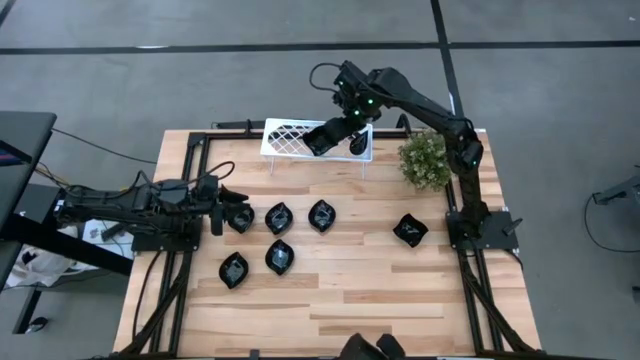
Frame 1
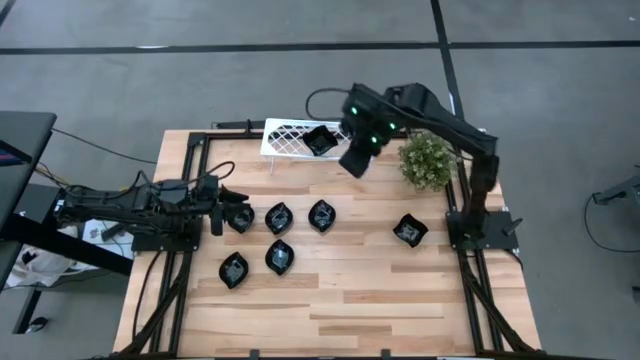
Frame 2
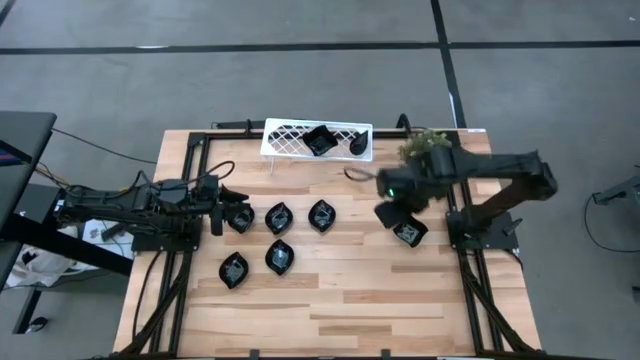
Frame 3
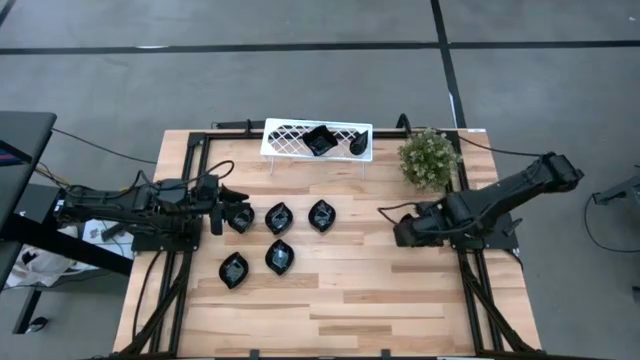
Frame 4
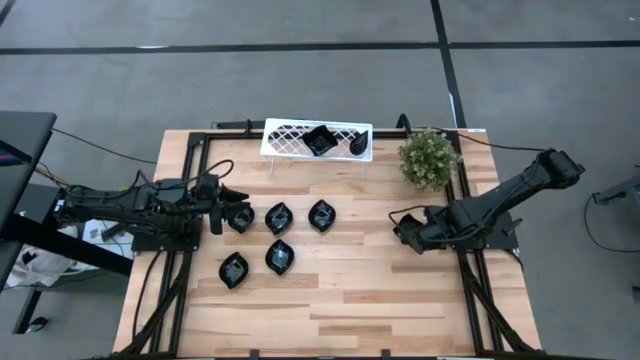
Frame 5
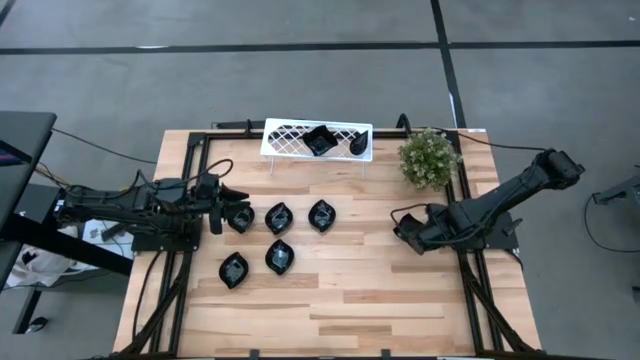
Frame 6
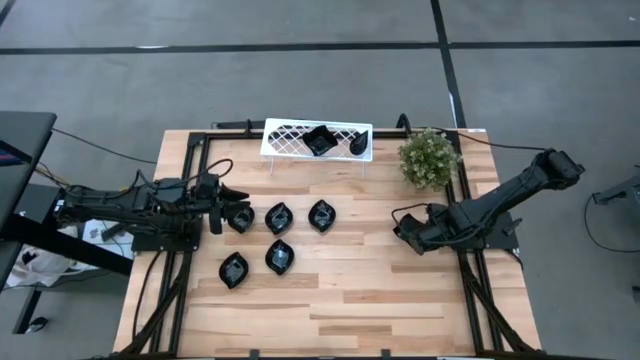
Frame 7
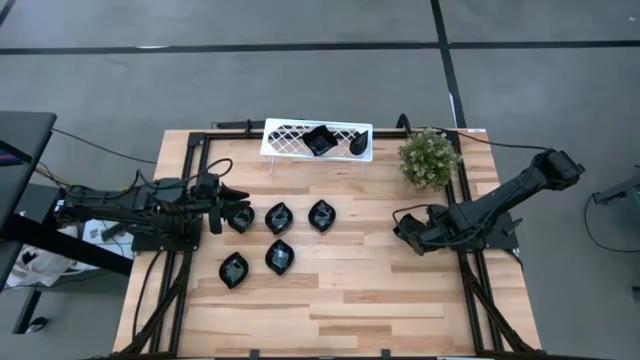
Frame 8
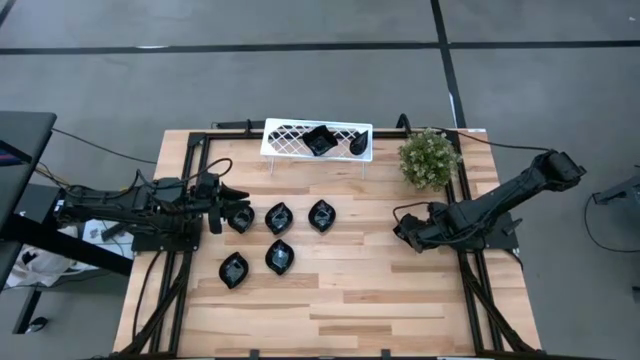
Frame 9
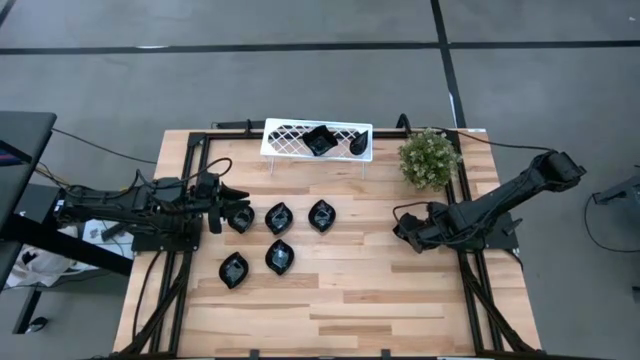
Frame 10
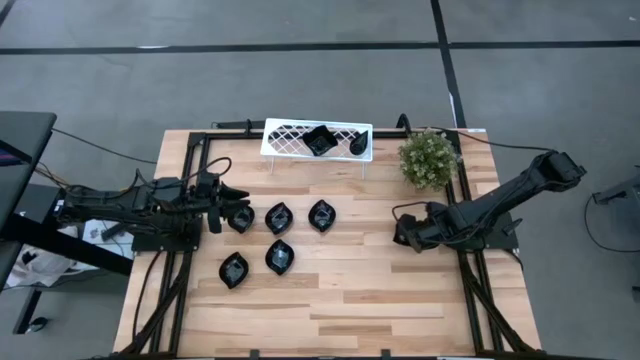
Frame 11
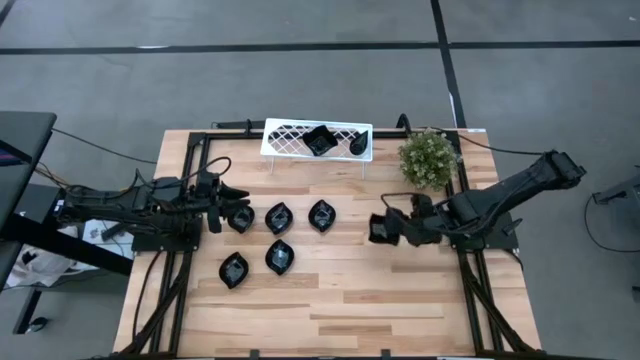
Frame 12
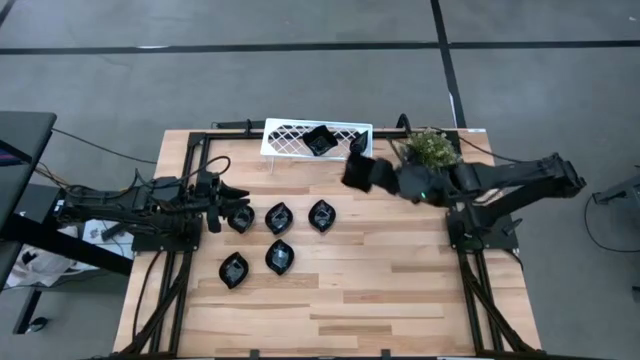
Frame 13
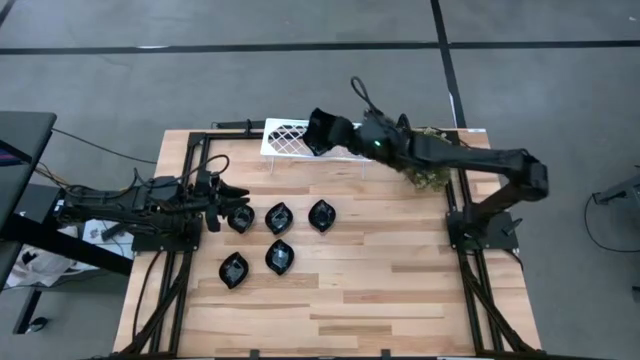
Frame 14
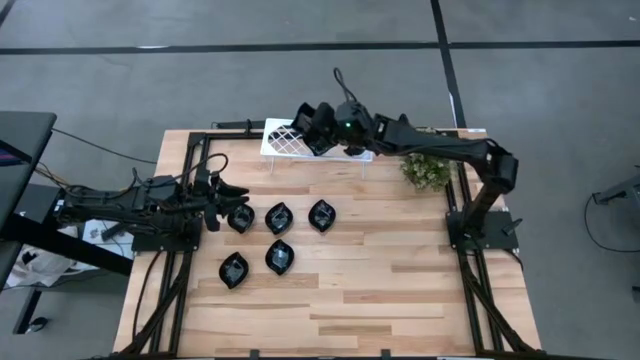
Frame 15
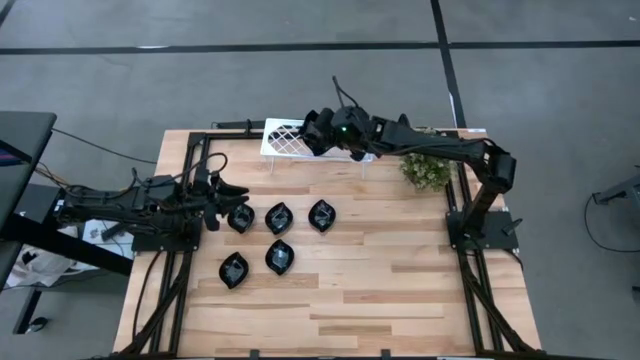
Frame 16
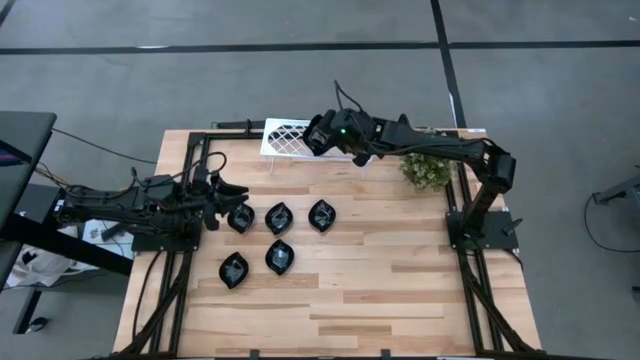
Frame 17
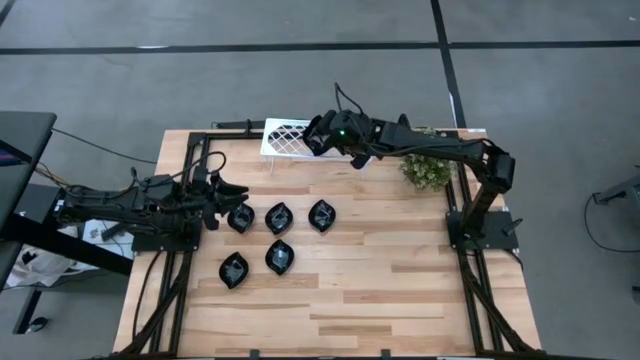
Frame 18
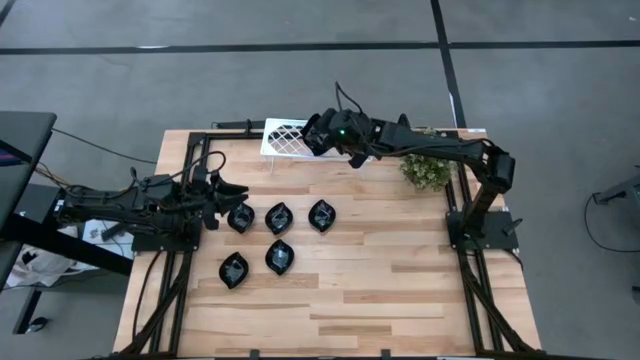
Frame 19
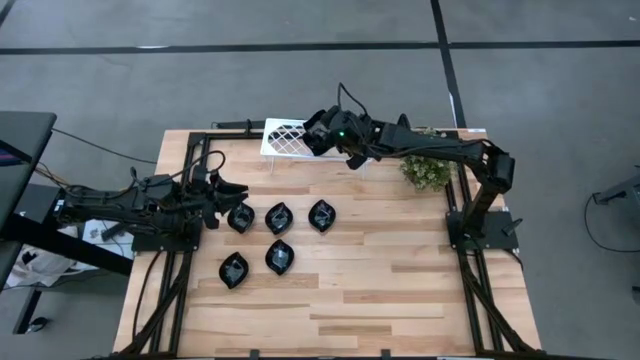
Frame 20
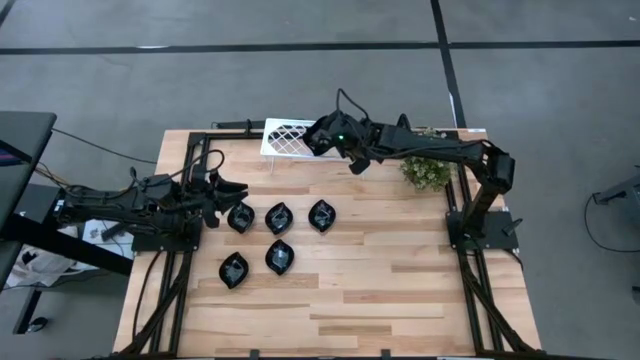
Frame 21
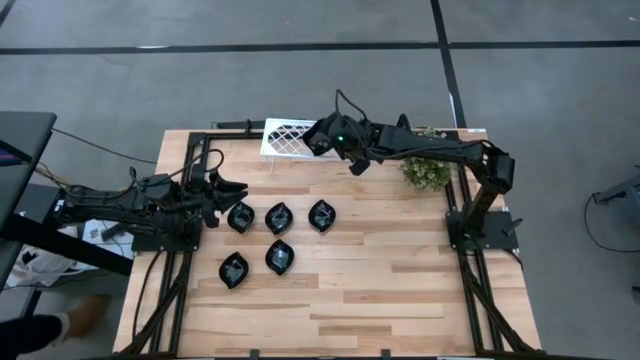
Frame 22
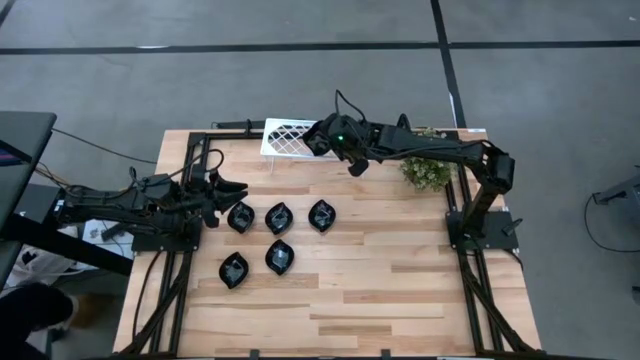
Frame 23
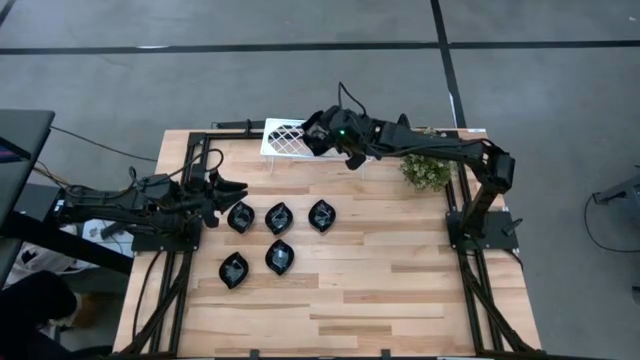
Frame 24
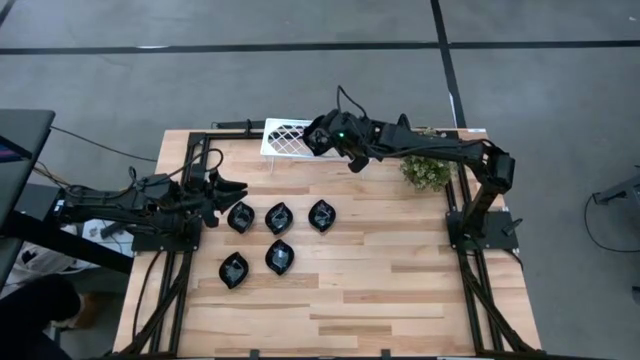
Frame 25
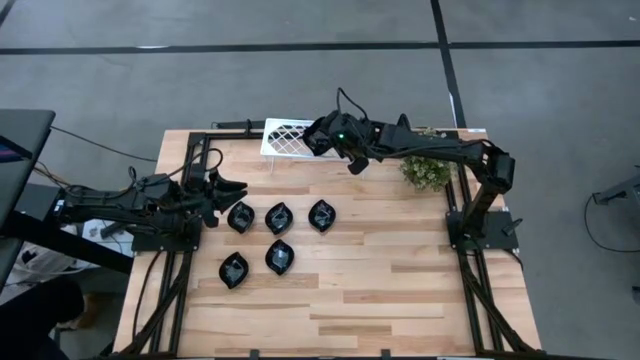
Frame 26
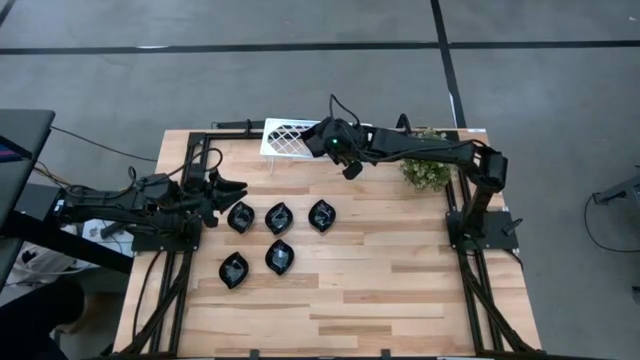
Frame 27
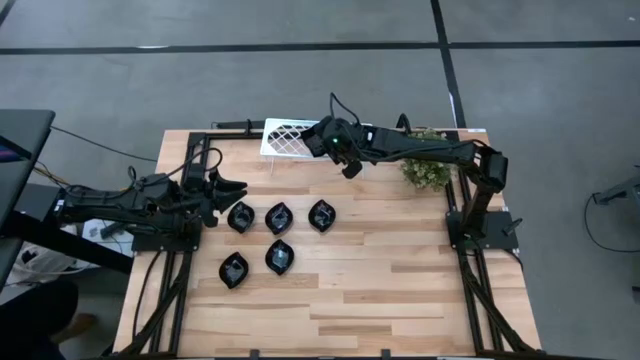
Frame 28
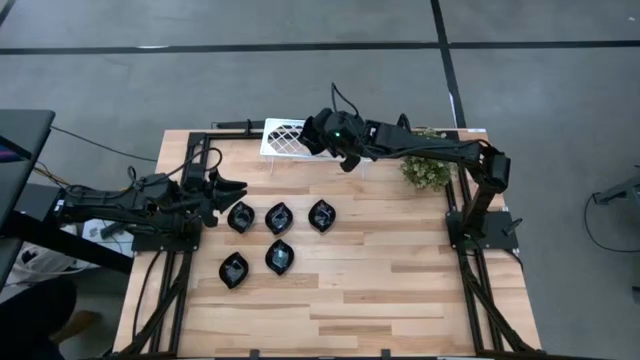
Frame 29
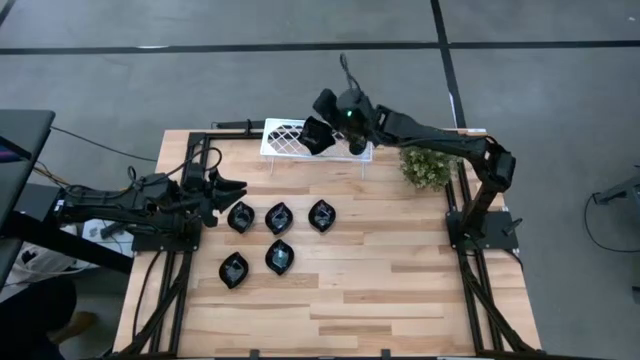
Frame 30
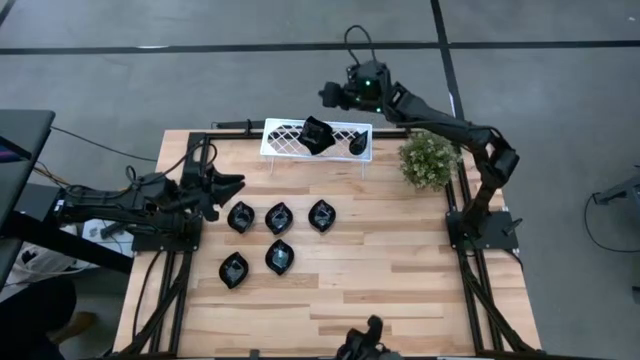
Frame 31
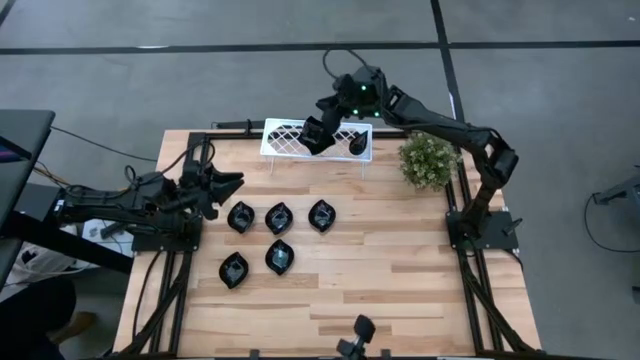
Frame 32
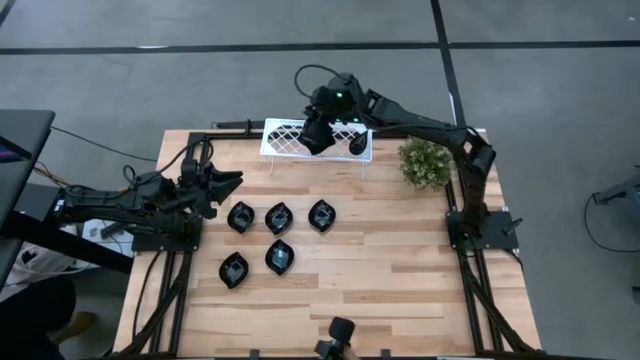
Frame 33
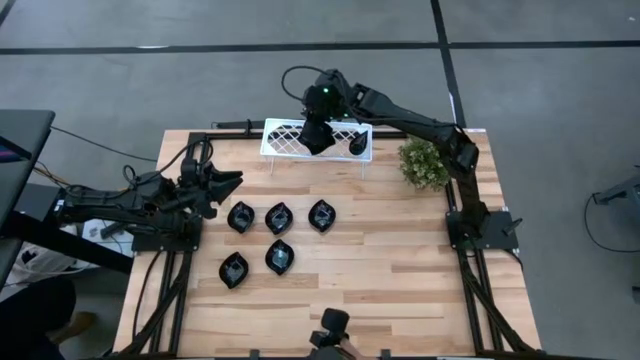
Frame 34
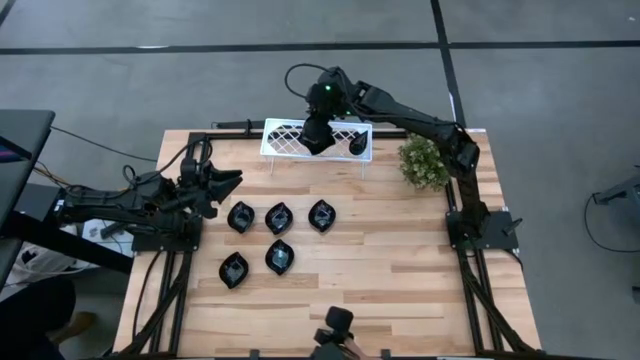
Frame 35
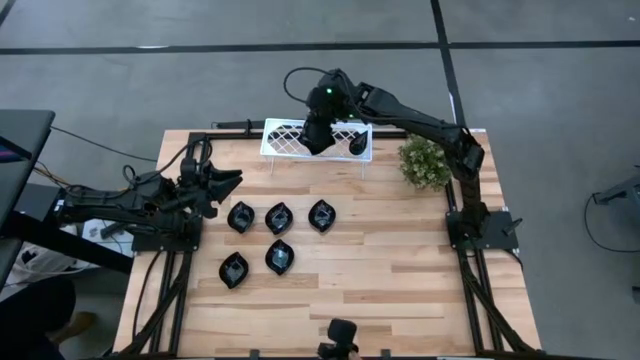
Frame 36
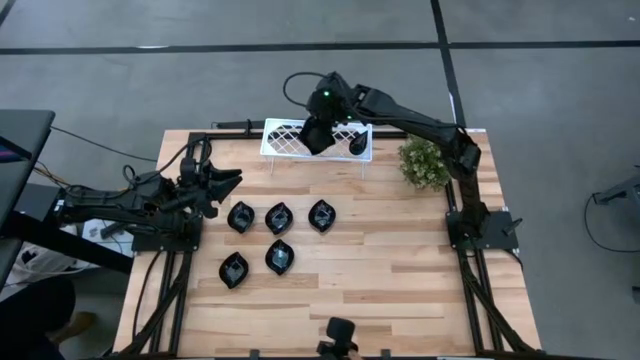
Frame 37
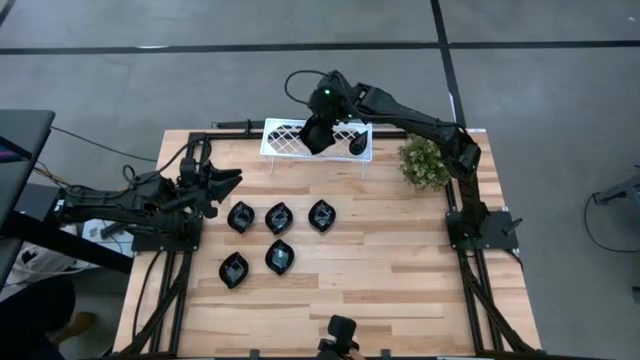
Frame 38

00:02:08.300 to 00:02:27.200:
Task: Pick & Place Mini shaped plates
Stack the black distorted square plate on top of the black distorted square plate on the shelf

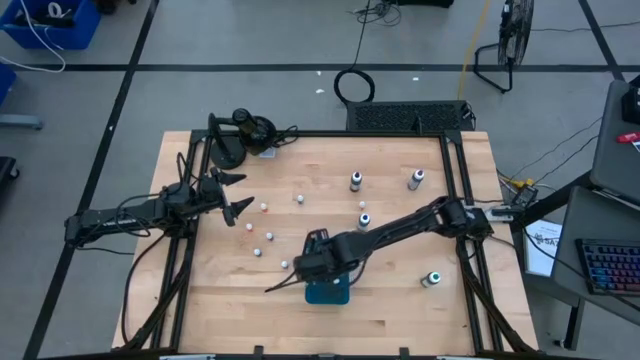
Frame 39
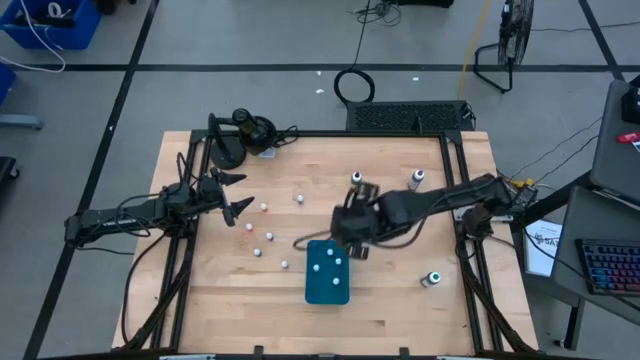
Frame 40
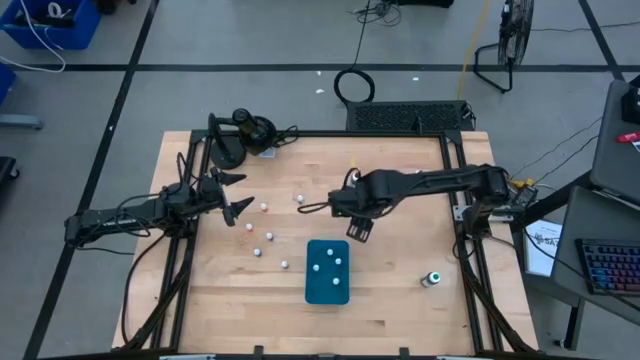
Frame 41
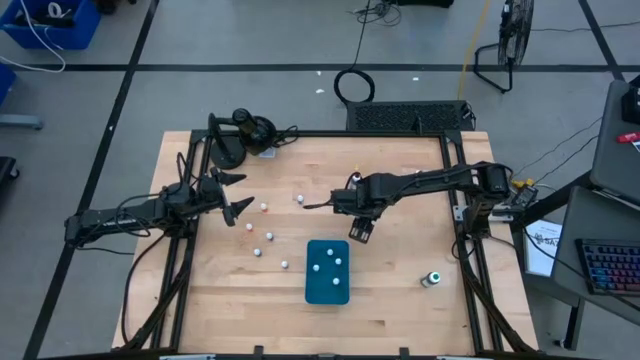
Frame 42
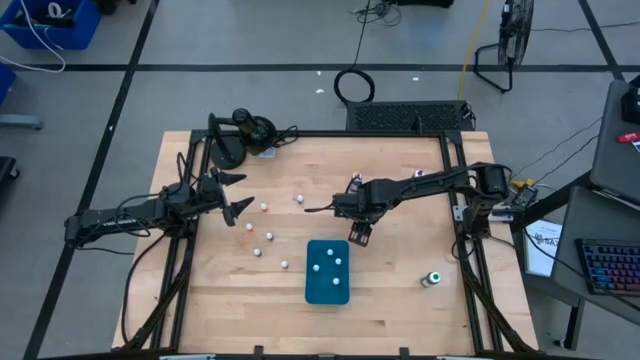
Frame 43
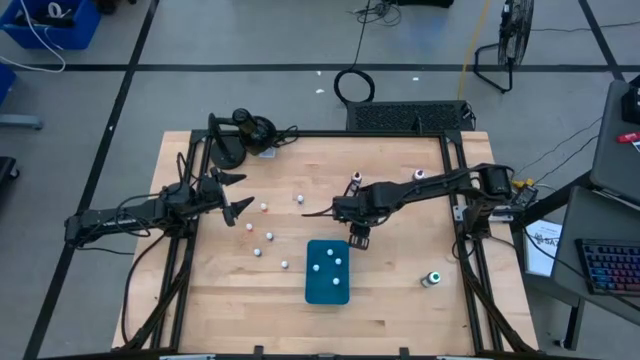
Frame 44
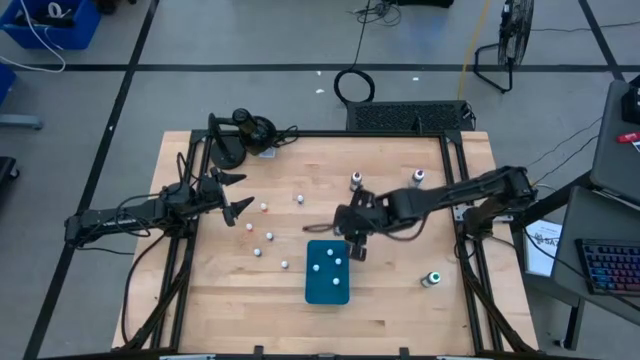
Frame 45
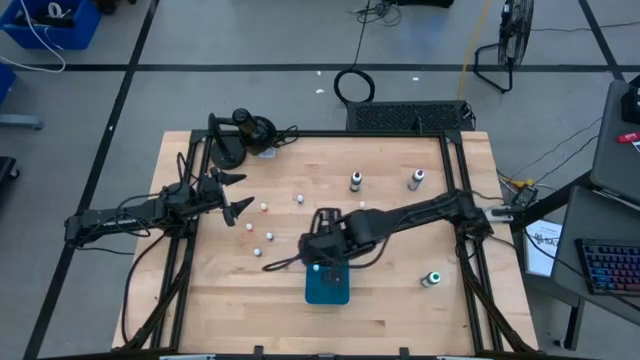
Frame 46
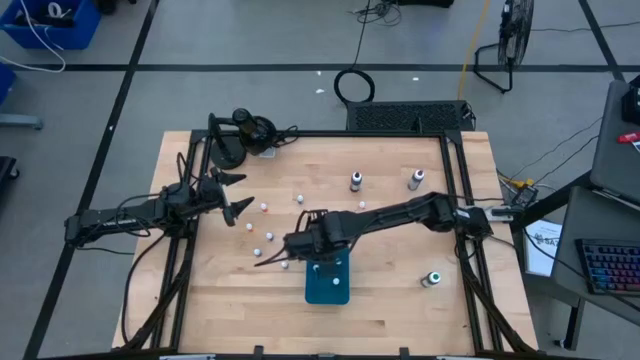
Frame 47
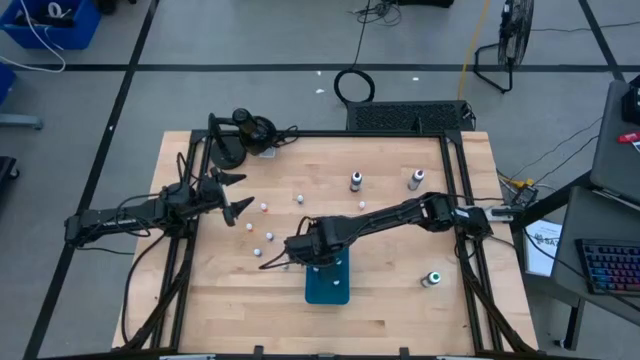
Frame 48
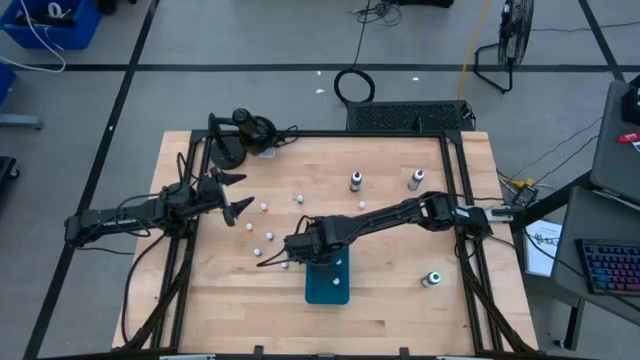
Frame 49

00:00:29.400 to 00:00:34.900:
Task: Pick & Place food coloring
Put the blue big food coloring bottle into the blue bin
